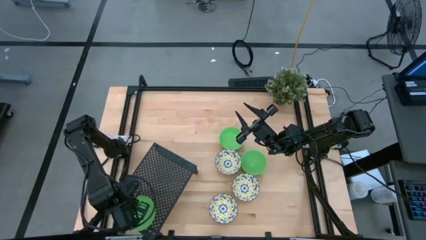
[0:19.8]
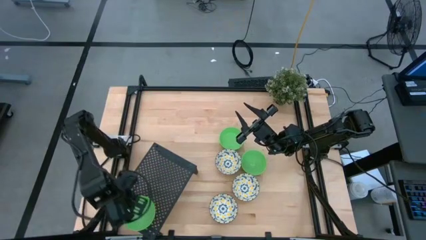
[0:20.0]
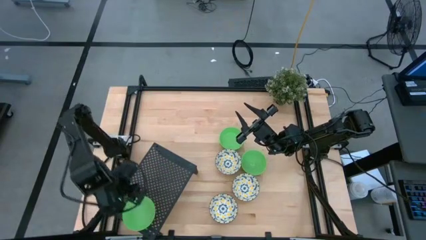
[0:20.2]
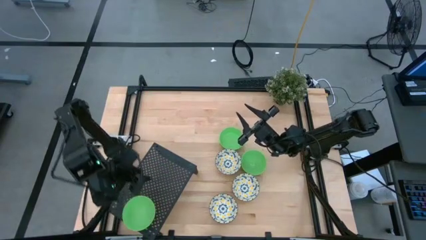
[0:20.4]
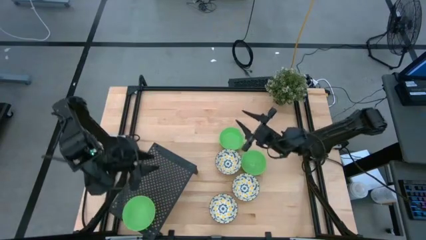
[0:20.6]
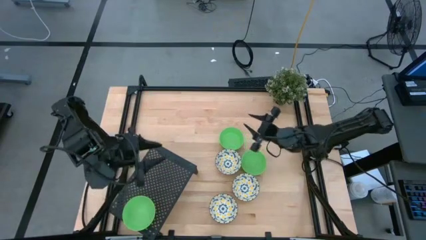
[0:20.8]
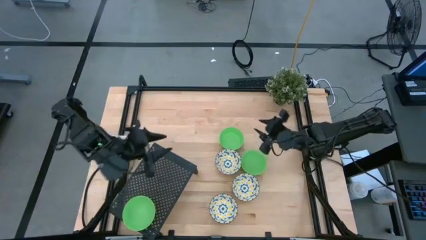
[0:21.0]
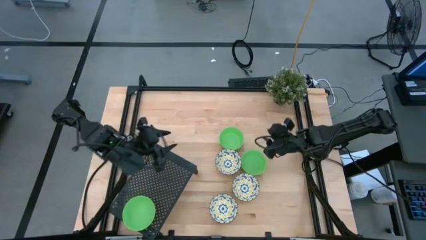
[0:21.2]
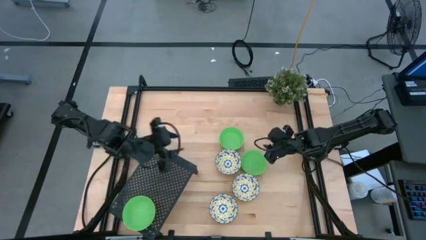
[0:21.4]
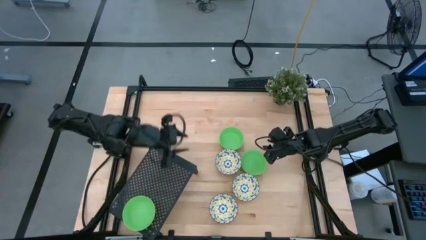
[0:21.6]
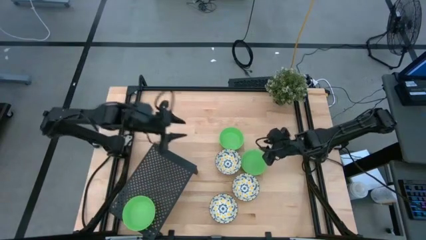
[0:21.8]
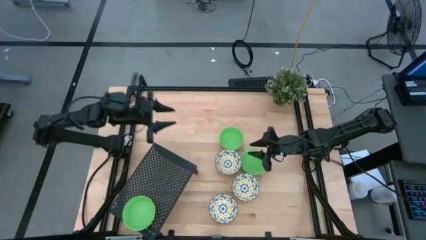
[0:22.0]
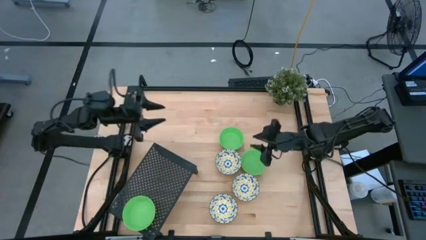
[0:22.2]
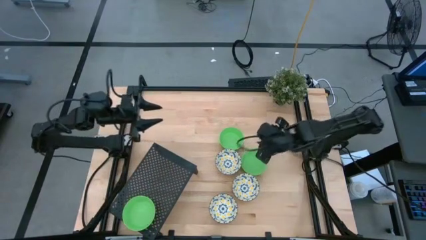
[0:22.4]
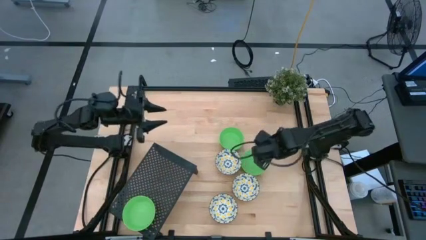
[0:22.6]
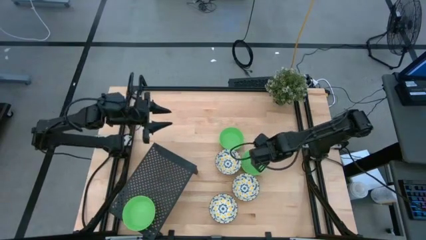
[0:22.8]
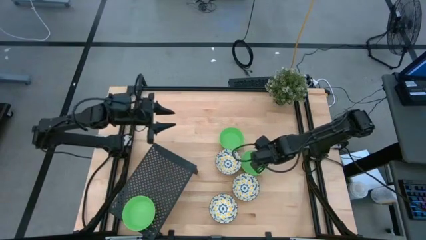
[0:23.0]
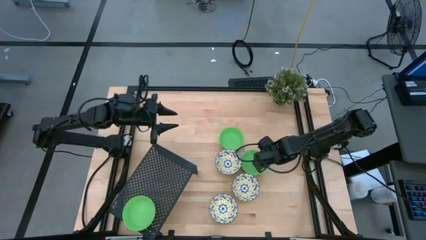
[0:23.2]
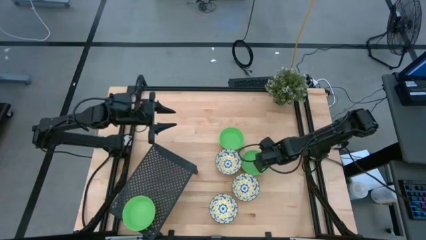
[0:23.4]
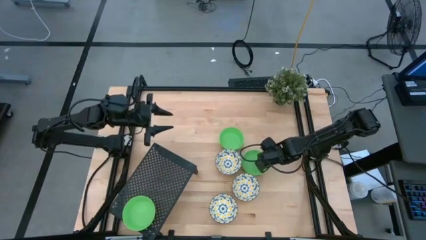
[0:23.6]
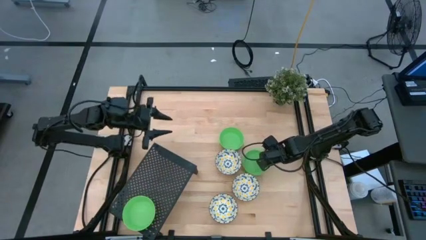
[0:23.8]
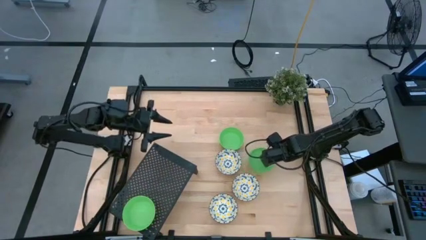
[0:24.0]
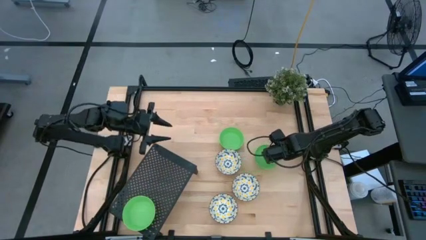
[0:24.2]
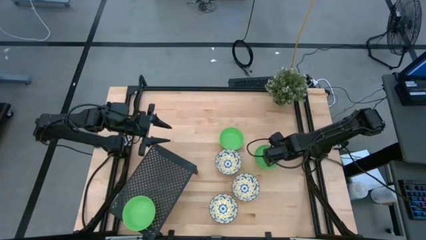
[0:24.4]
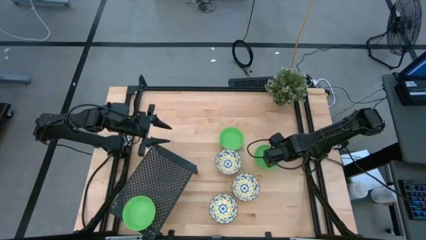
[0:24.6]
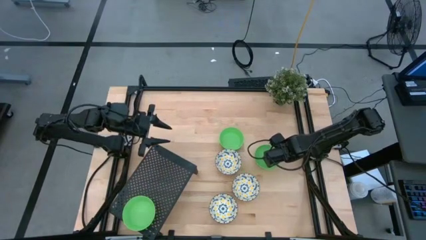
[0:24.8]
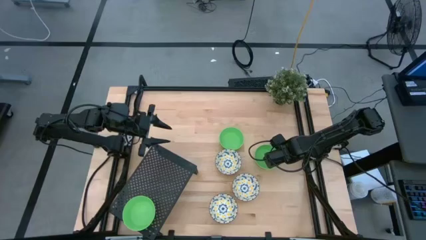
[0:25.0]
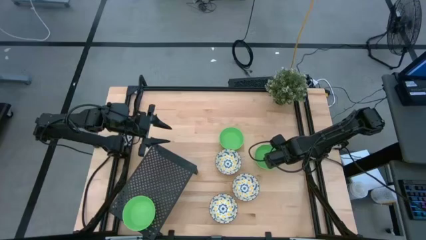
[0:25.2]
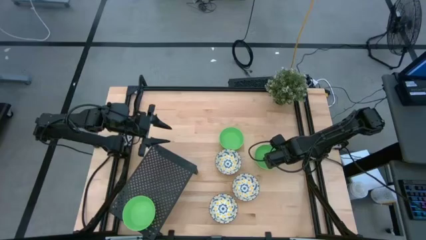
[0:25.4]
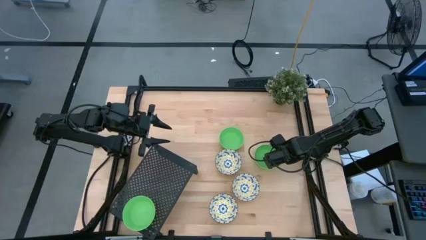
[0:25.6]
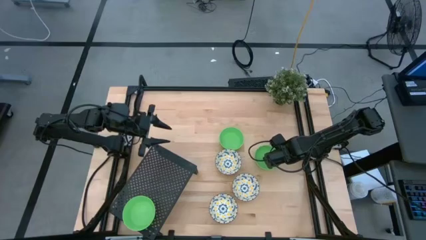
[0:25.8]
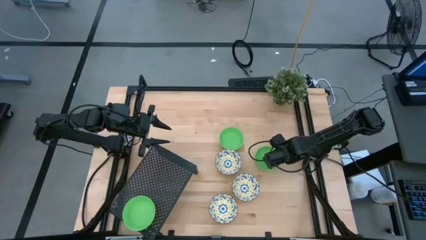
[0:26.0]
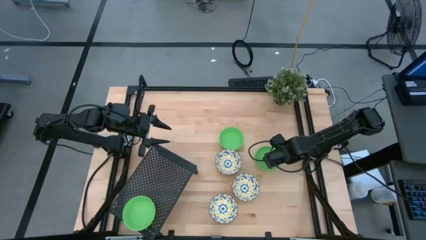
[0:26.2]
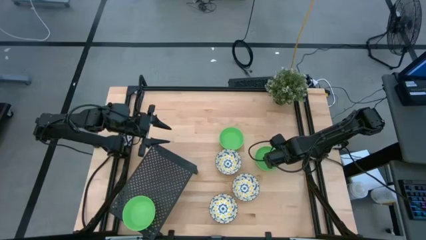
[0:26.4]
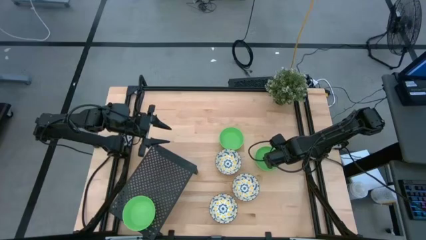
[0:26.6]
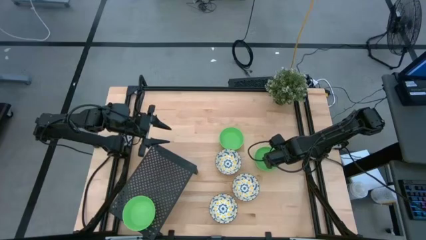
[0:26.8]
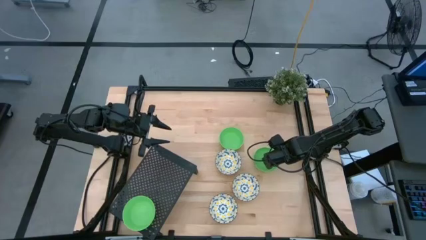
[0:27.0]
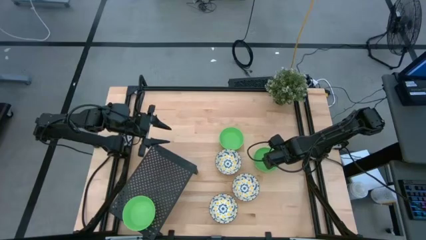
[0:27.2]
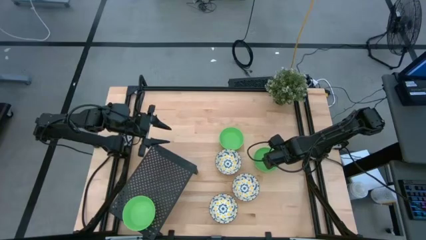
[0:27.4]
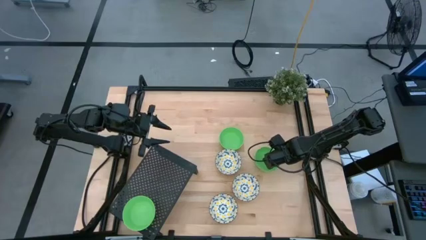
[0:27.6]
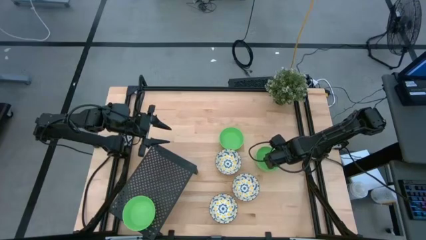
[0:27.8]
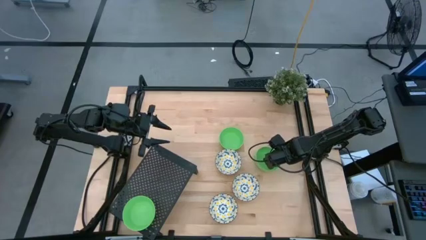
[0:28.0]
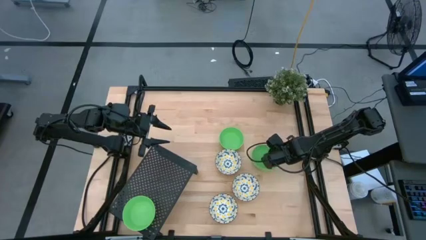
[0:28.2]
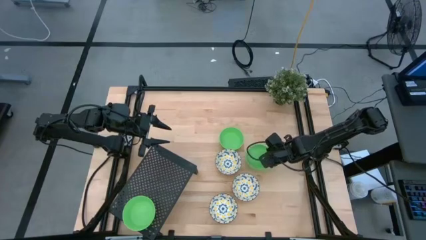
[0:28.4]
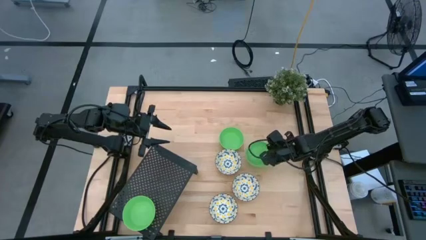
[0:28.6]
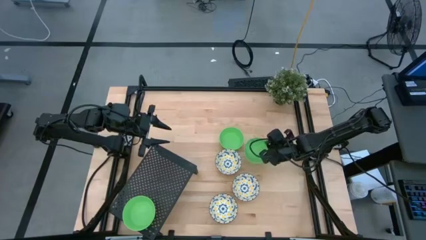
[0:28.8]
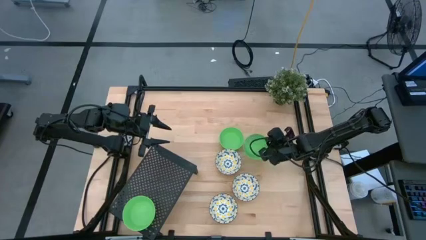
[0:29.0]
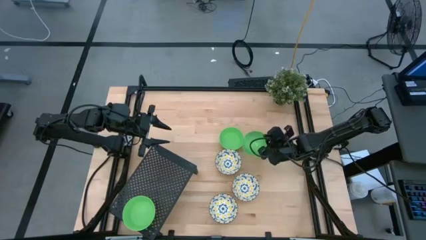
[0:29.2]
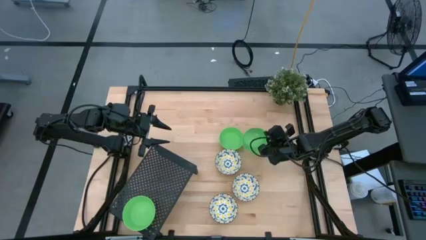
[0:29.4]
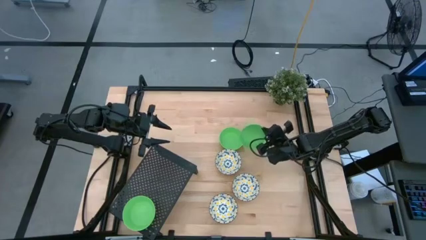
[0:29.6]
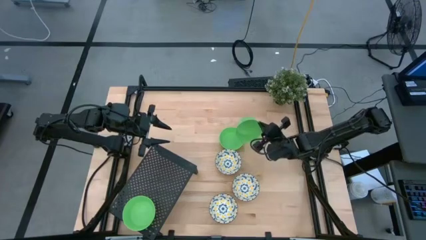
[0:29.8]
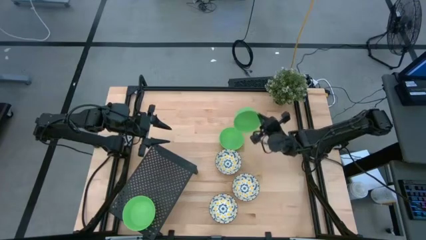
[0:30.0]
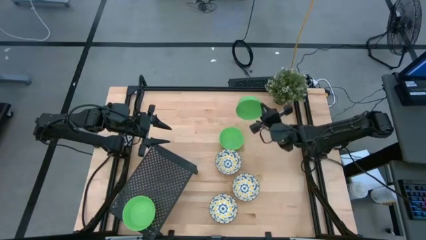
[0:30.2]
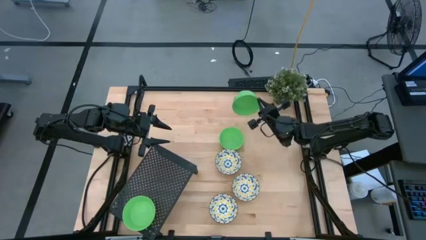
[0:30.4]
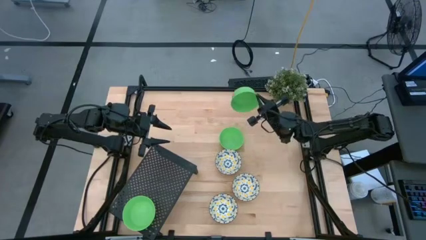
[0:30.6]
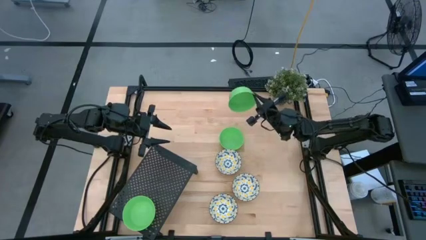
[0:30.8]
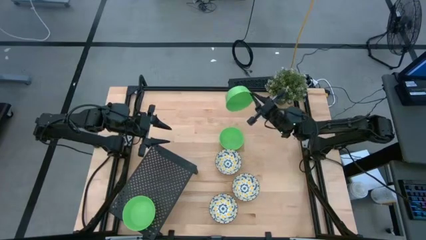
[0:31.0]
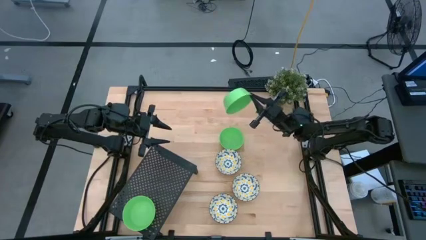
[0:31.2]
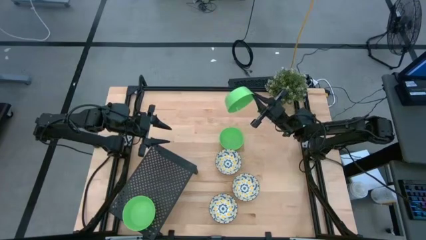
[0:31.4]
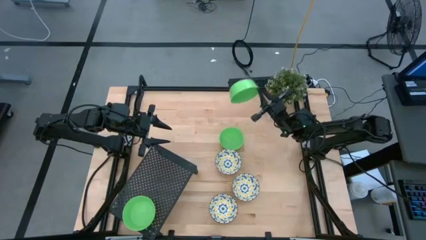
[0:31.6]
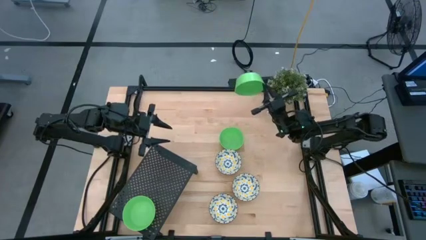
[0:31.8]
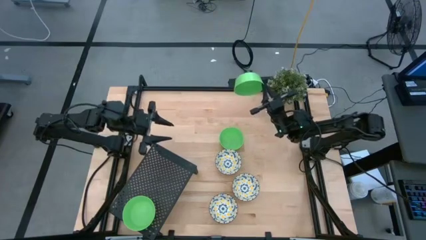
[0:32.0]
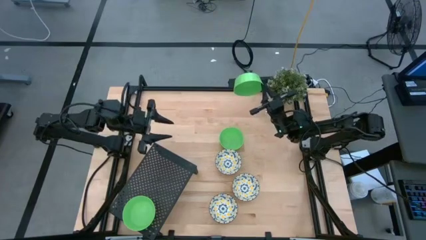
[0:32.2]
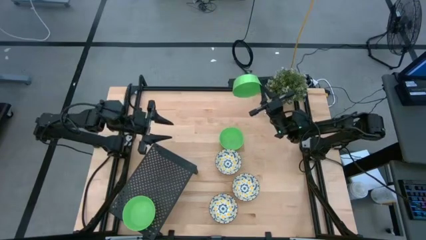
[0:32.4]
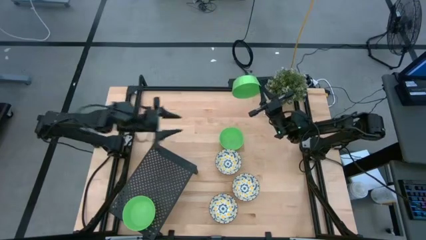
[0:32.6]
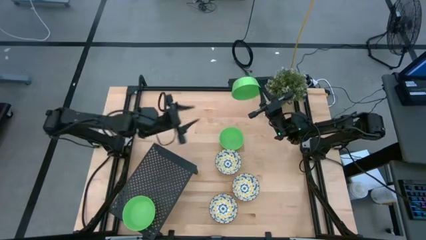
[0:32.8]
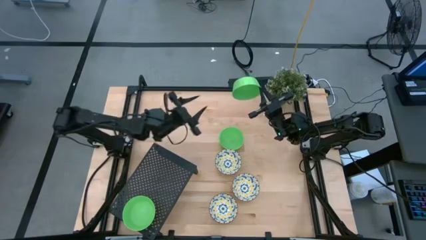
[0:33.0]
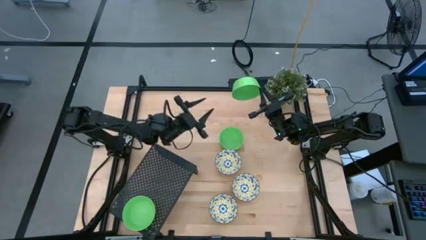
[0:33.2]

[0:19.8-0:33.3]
Task: Pick & Place Mini bowls
Stack the bottom green bowl on the green bowl on the shelf
